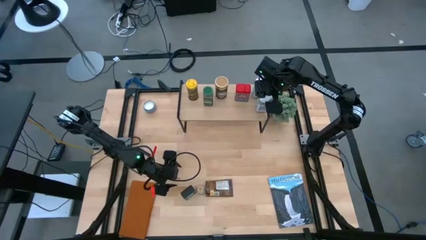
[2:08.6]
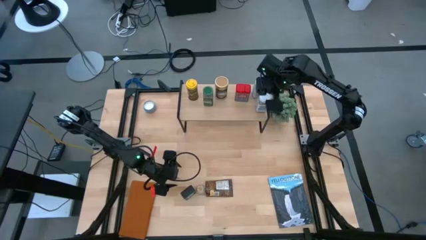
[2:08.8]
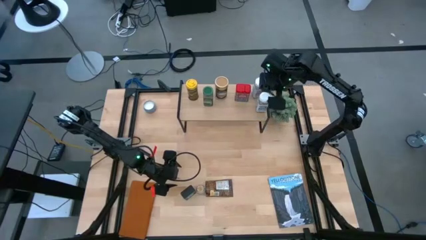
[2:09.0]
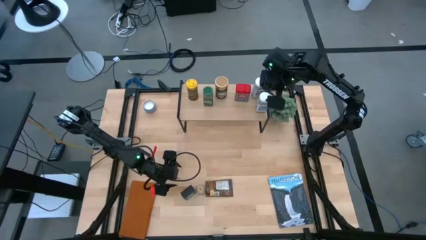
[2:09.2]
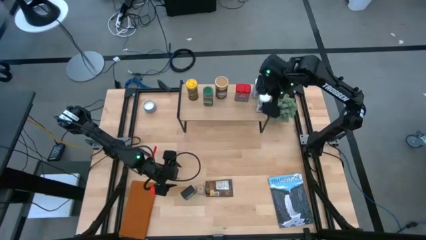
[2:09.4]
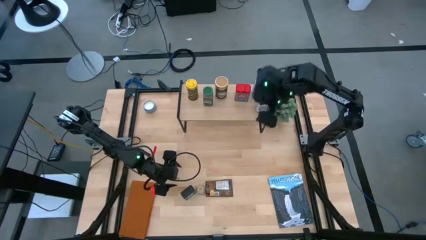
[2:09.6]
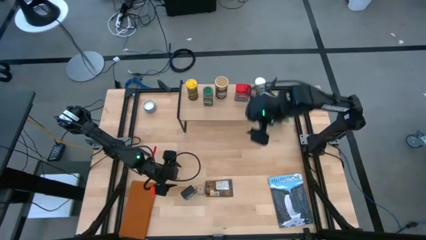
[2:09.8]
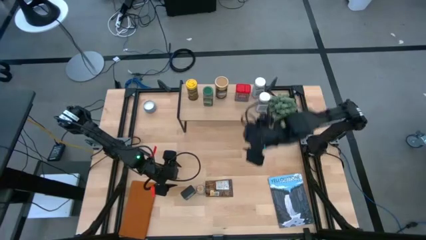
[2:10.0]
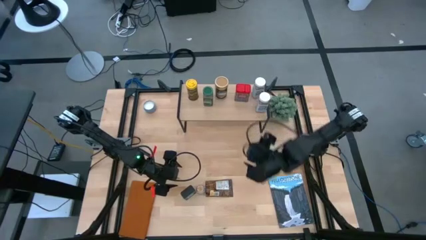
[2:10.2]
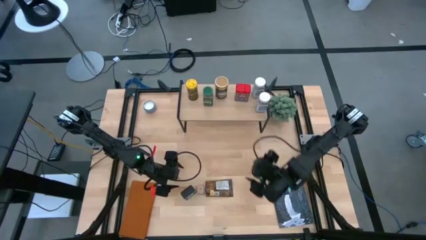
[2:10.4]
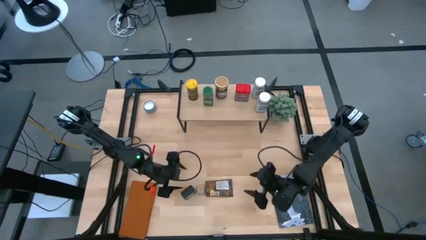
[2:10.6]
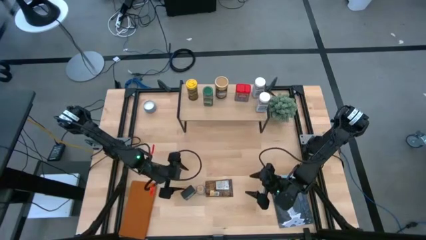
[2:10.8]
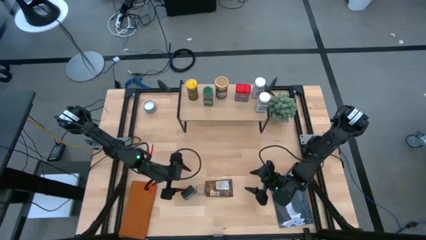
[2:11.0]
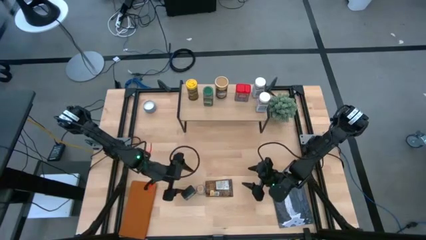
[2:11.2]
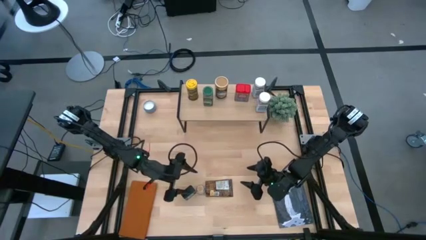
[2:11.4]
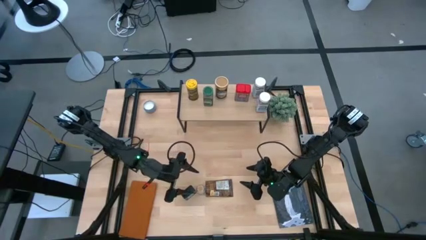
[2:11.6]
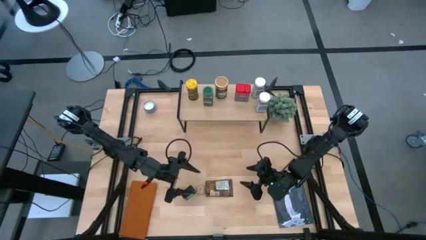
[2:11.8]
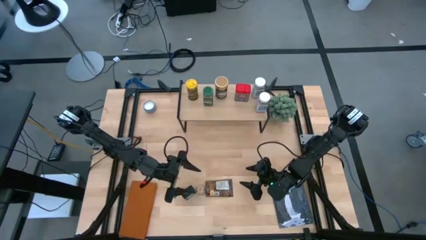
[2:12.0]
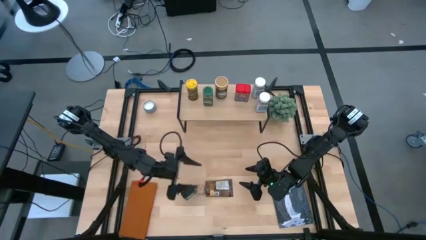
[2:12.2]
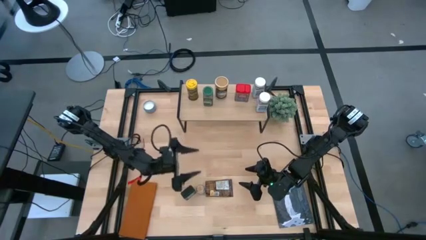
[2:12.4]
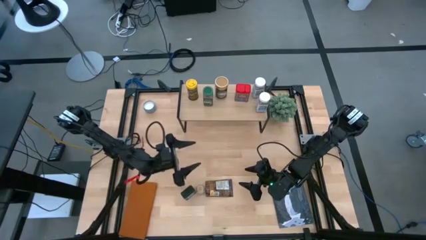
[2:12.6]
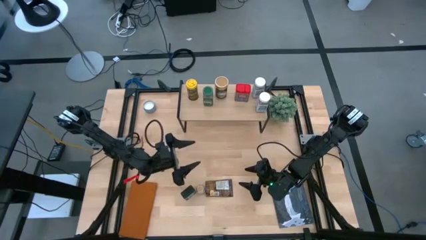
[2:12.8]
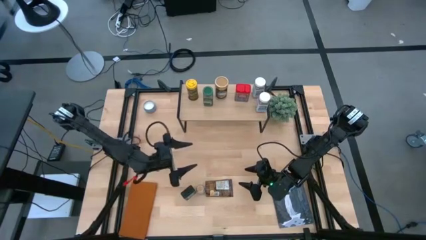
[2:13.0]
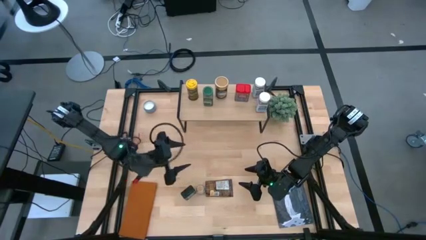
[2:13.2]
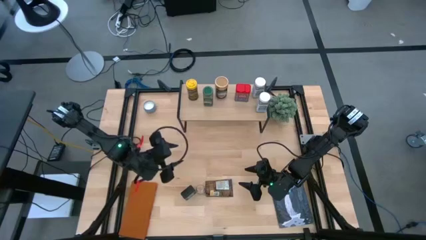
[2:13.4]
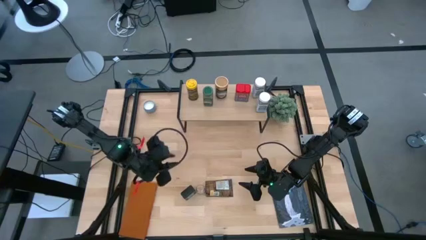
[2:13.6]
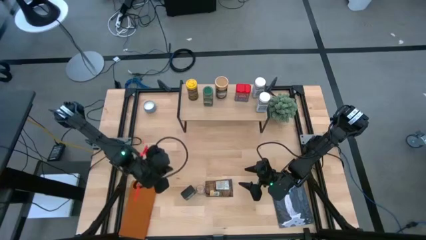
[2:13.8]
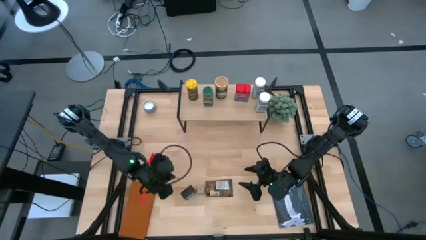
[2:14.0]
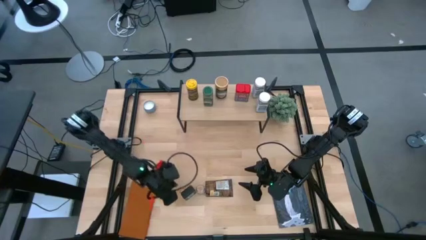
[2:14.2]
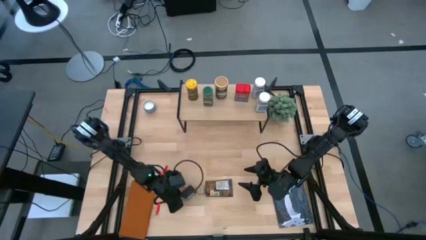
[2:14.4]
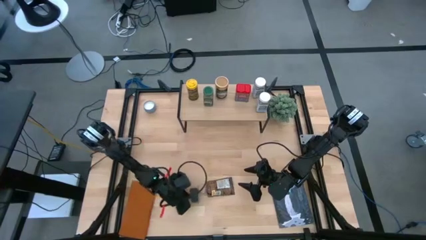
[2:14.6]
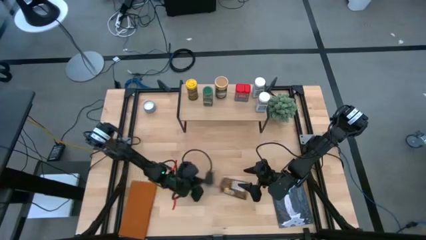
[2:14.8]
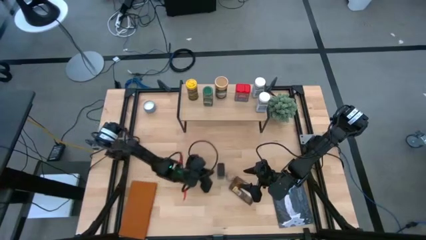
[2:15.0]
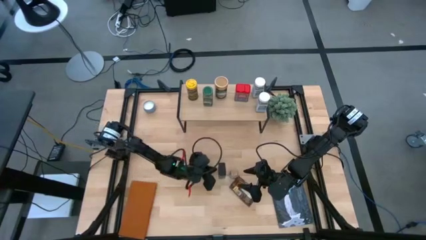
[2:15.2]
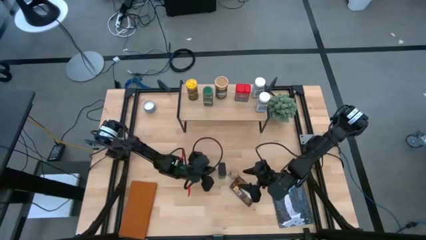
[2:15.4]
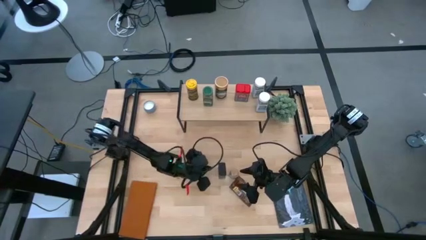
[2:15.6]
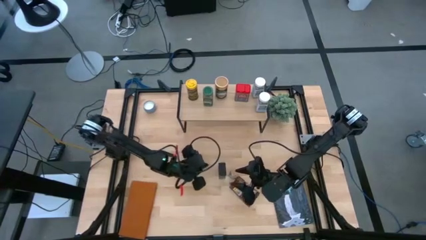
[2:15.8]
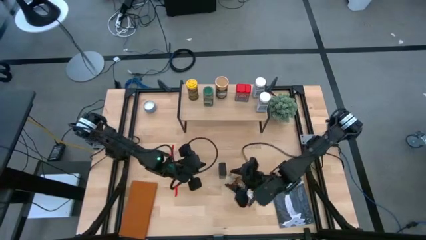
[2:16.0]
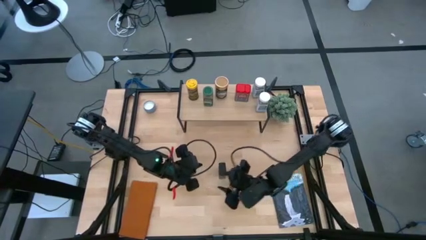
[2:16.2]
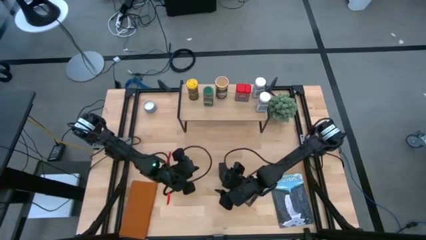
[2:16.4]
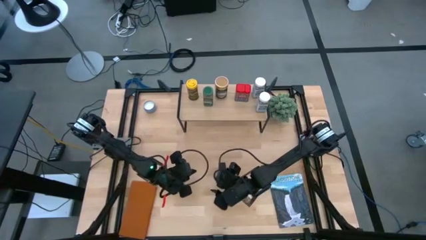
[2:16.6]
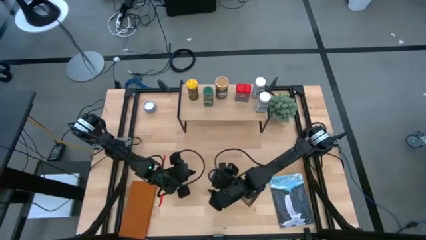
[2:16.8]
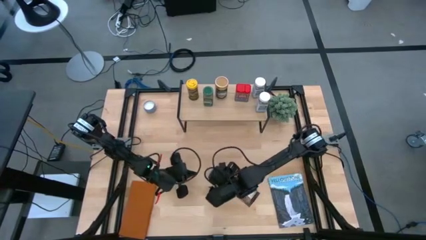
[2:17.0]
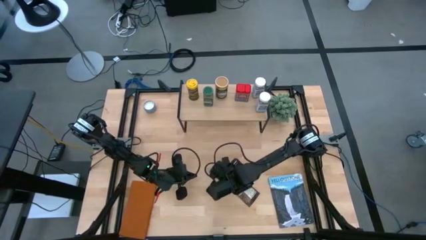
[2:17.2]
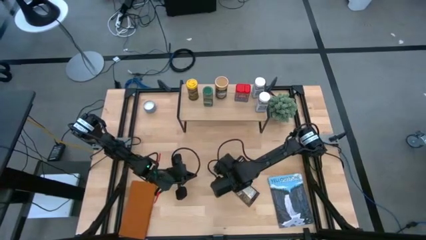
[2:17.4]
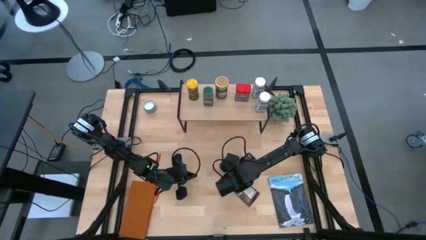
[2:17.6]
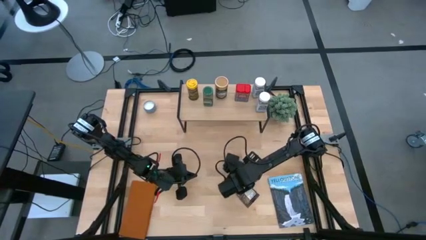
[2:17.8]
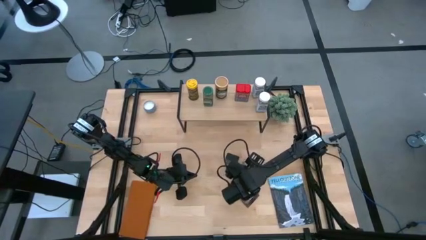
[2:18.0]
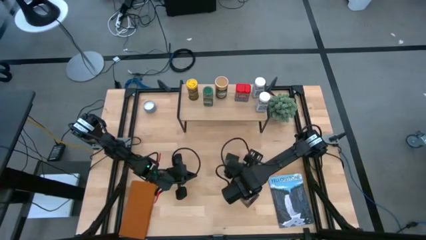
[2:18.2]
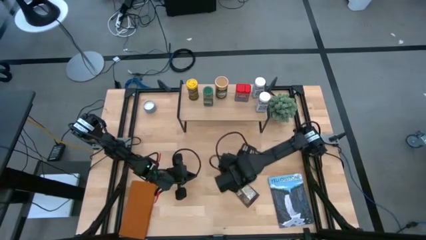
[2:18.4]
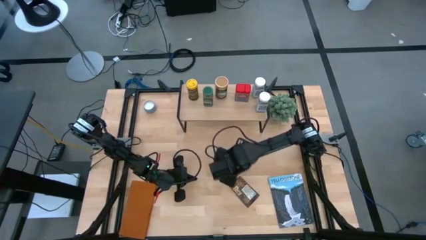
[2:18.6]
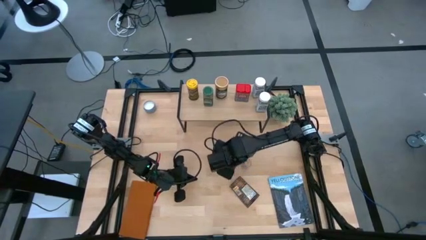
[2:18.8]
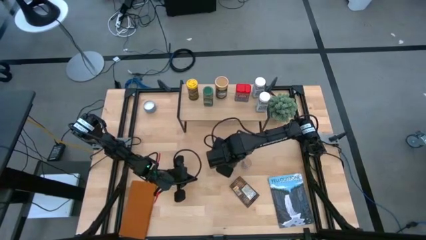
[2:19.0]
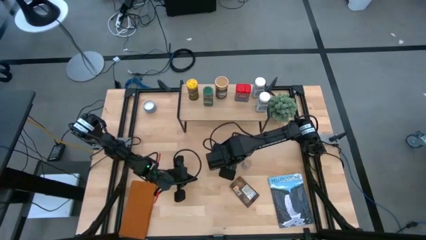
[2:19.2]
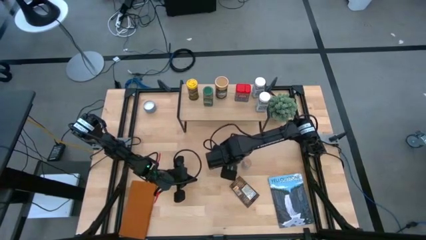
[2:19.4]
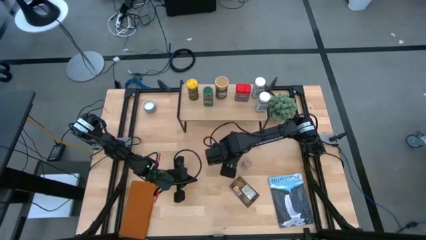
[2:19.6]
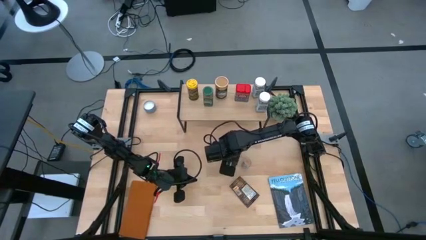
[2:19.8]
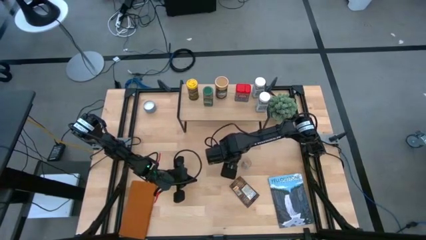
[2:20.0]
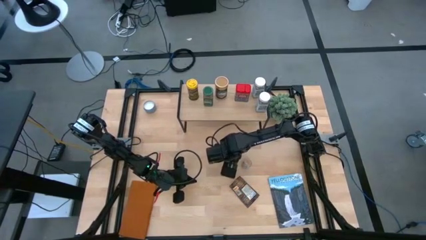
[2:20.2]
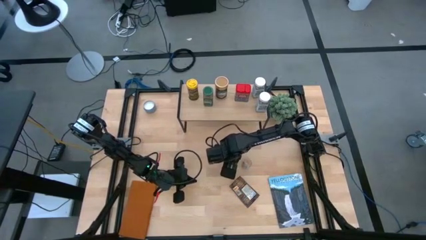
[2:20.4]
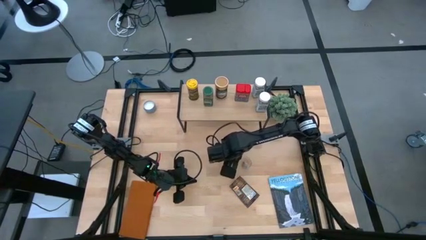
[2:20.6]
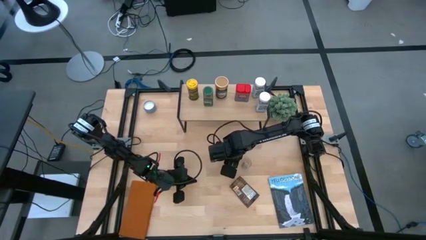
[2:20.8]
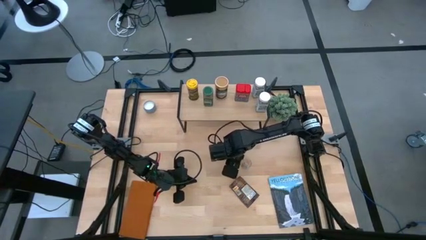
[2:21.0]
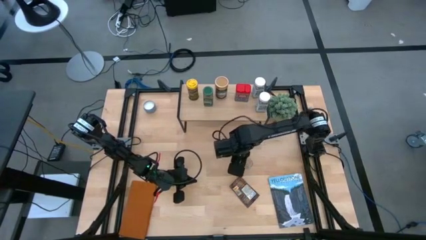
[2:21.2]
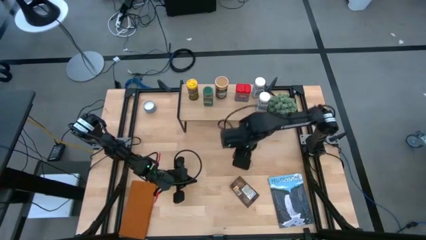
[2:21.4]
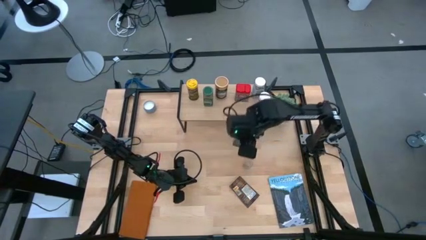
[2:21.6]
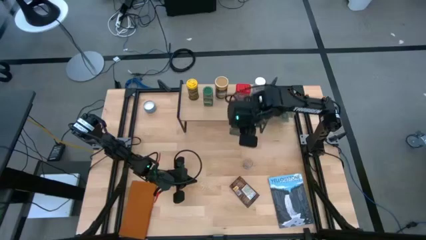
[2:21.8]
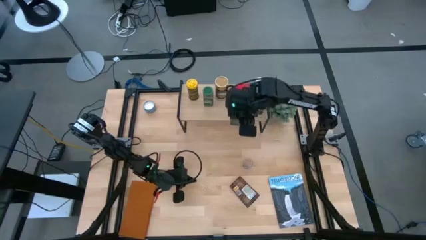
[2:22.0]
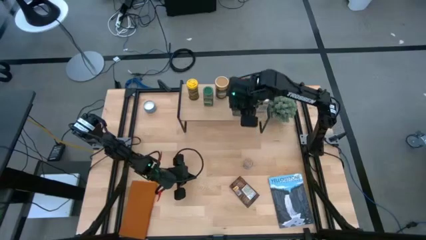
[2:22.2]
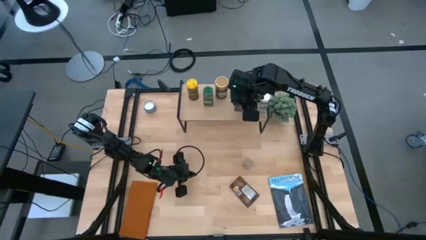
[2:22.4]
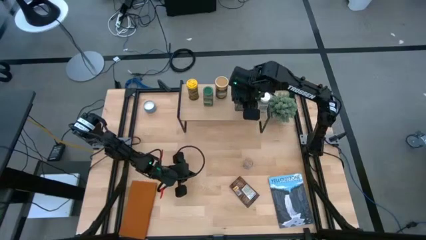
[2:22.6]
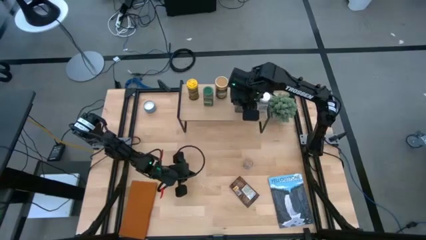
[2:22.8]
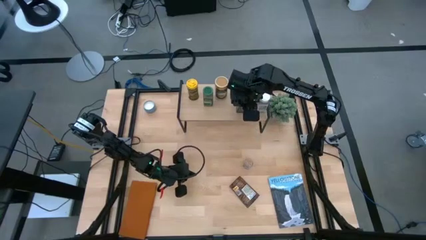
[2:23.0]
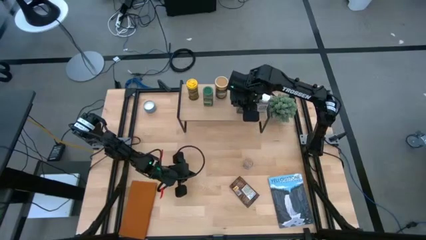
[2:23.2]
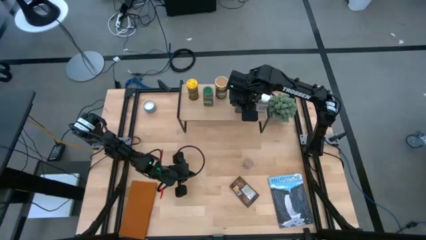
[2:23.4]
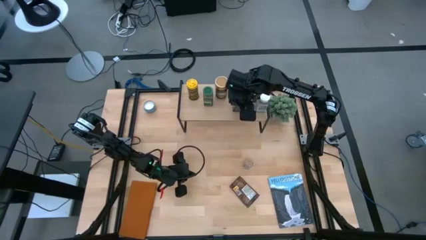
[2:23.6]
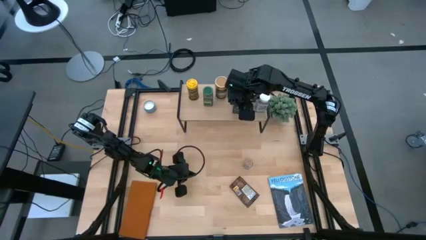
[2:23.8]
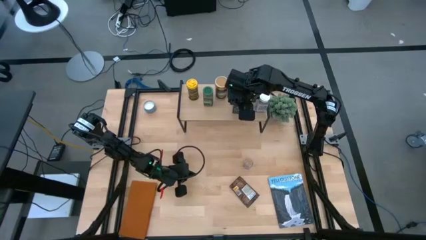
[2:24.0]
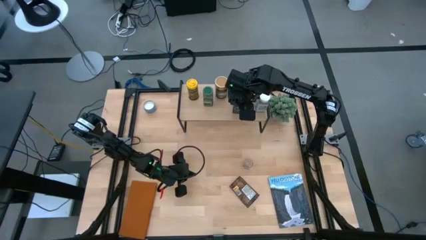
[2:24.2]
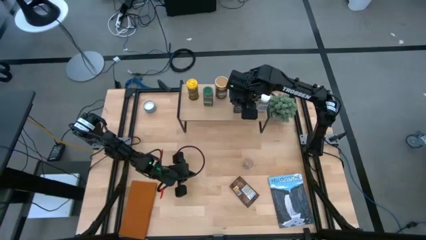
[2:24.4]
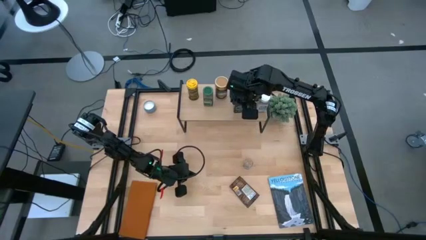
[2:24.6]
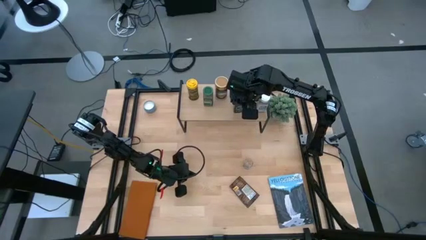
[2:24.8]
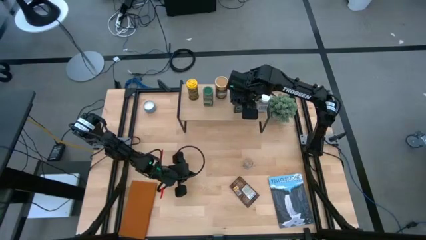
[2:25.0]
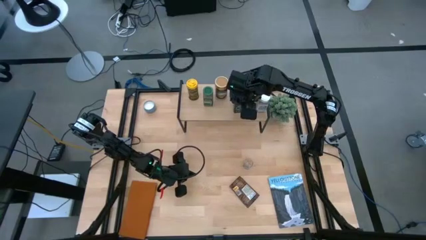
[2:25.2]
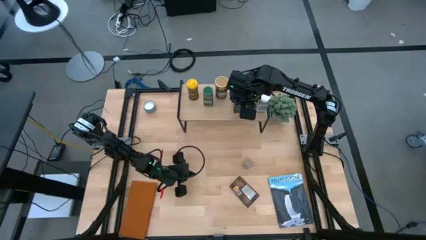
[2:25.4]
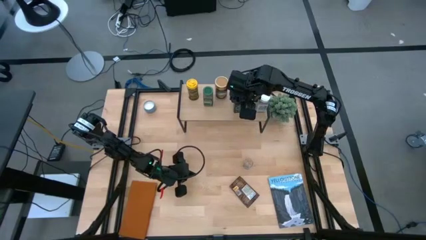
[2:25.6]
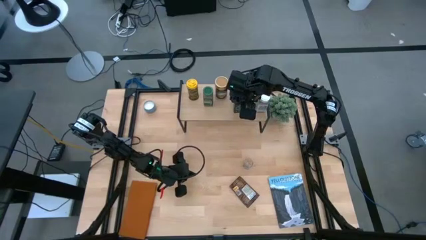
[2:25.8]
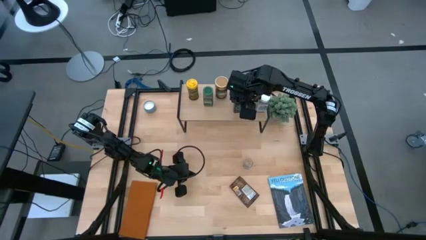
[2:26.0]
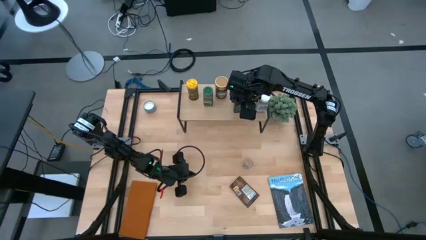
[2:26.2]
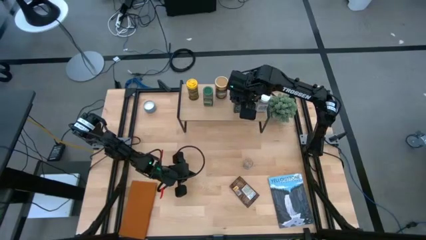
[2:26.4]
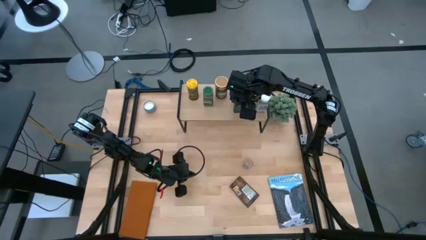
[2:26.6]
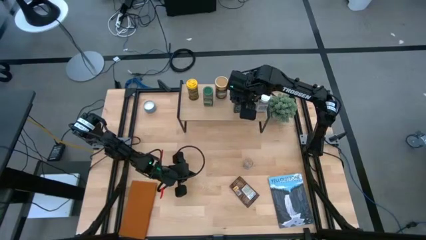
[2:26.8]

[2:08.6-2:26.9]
Task: Shelf spices
Put the black seasoning can on the shelf
